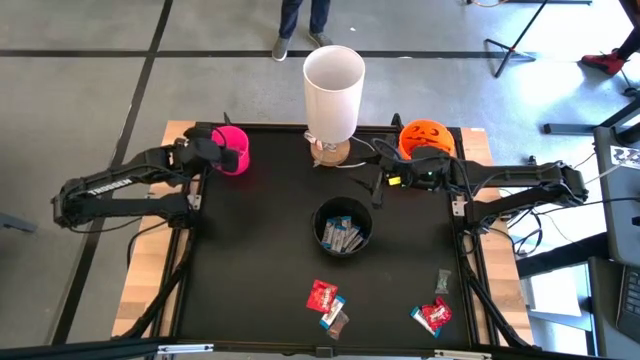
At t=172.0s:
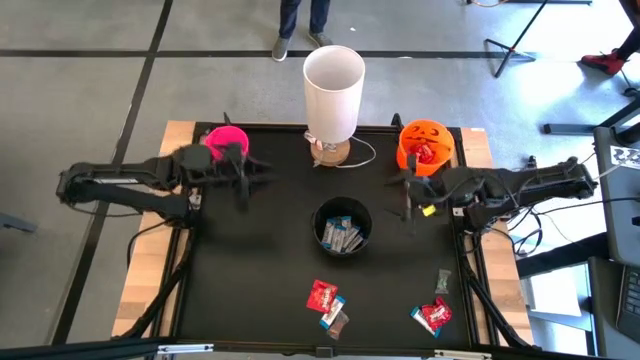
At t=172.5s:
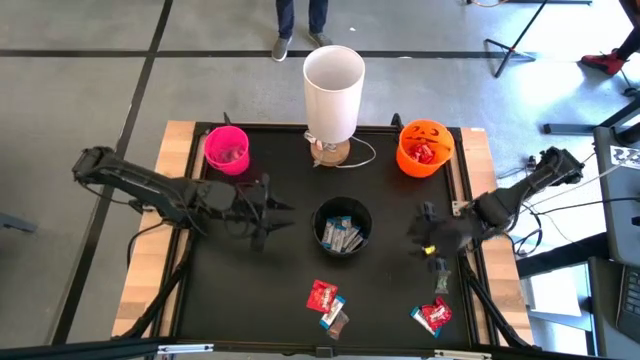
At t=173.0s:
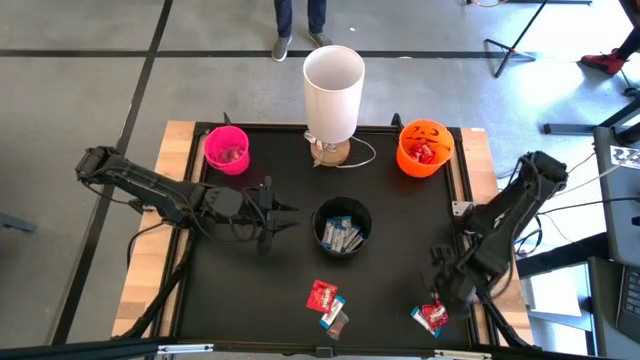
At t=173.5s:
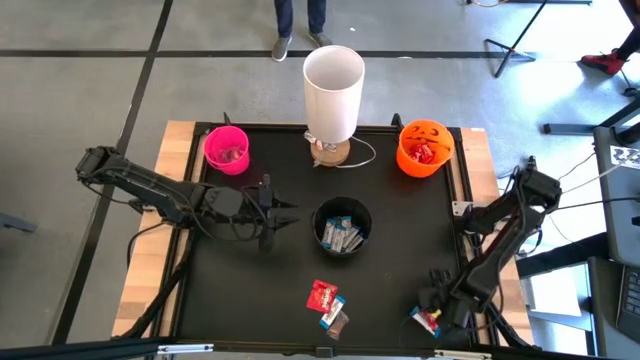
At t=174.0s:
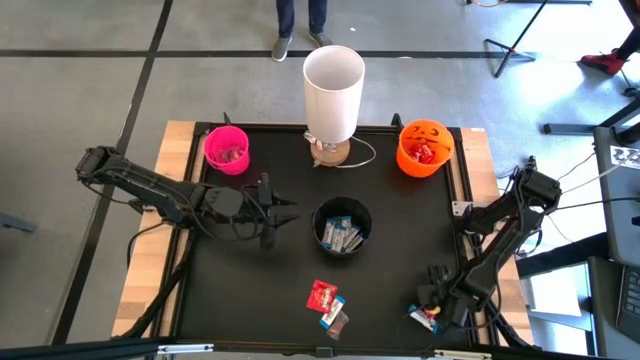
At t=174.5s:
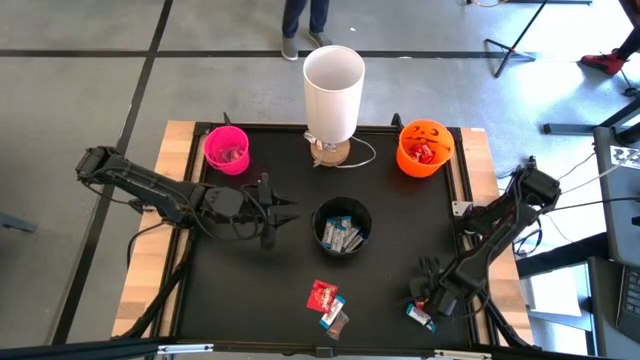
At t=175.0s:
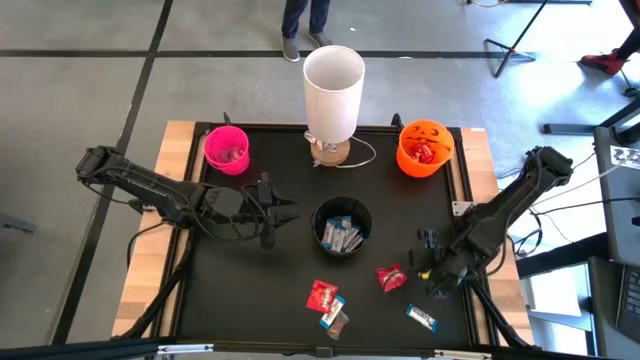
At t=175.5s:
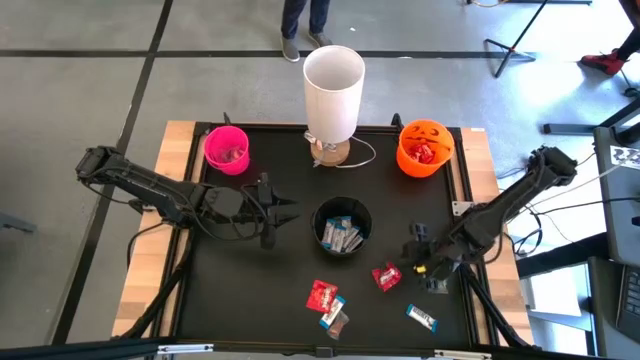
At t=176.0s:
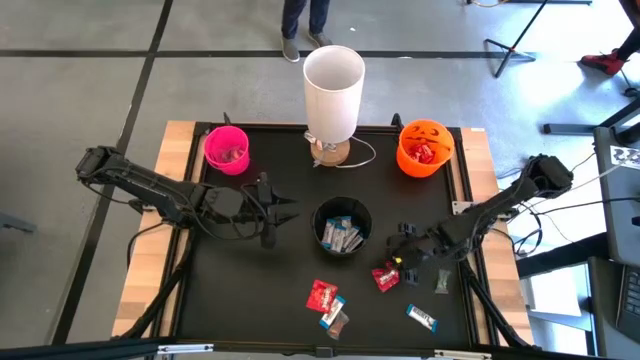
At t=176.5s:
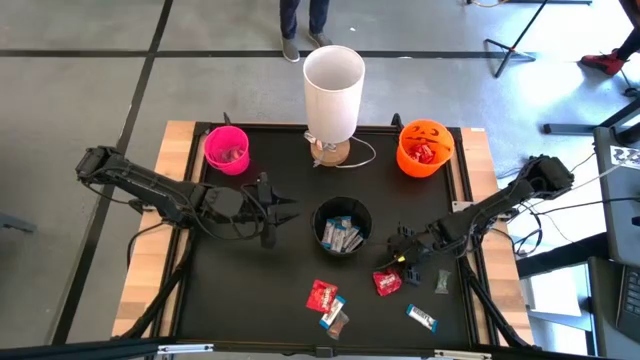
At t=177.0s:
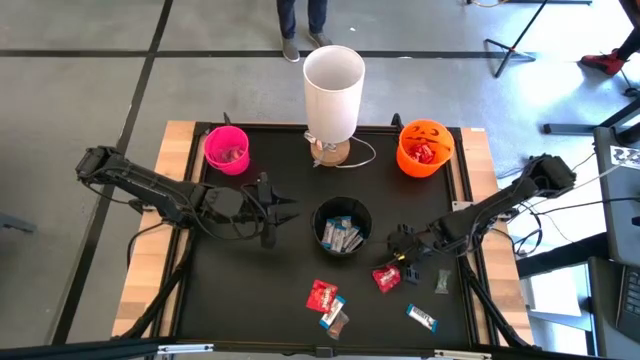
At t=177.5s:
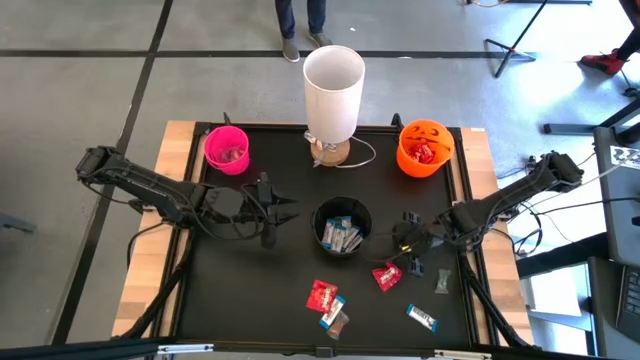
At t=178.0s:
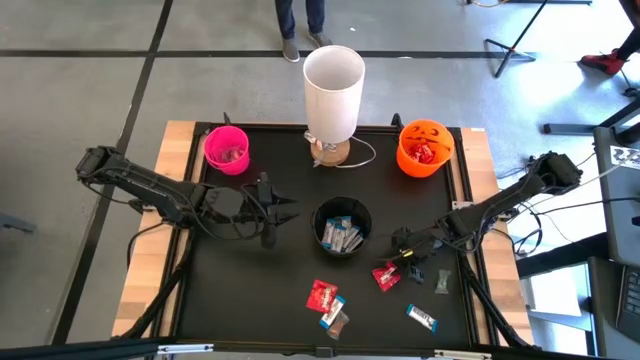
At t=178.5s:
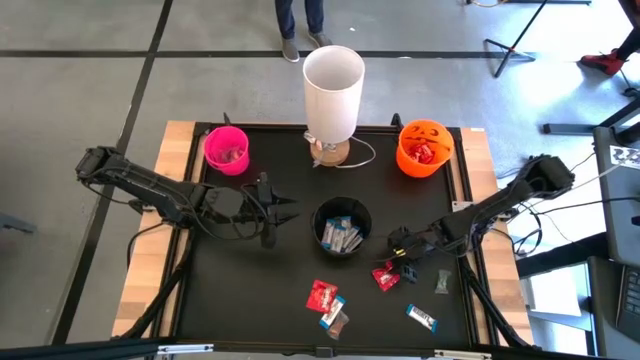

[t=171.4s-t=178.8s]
Task: Sort candy
Put the red candy pack into the orange bucket

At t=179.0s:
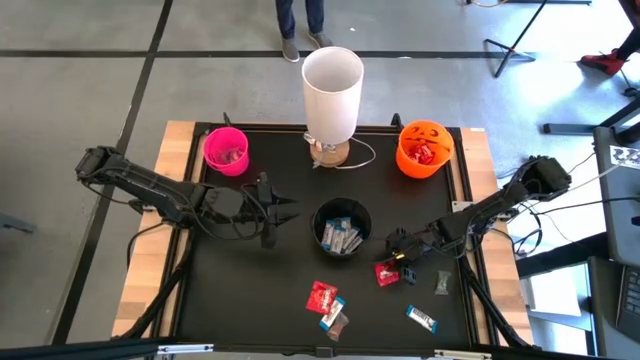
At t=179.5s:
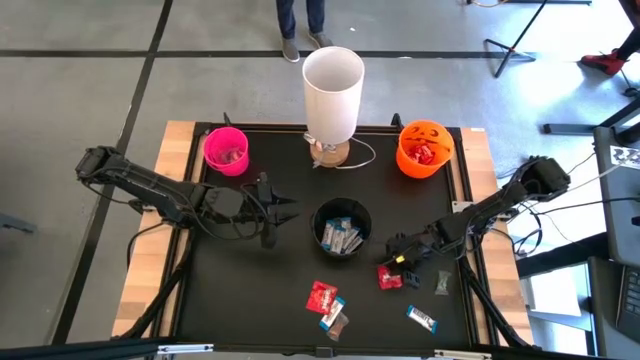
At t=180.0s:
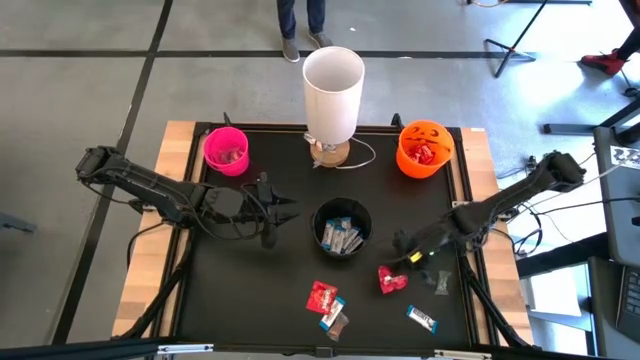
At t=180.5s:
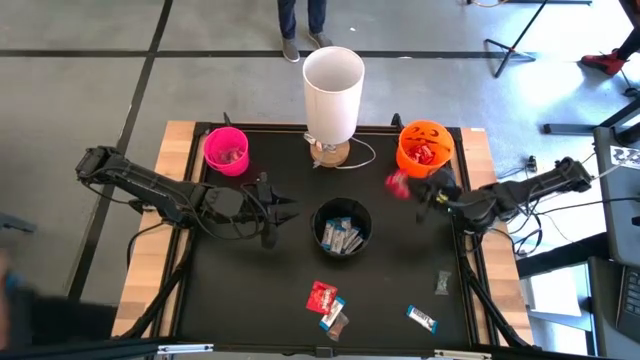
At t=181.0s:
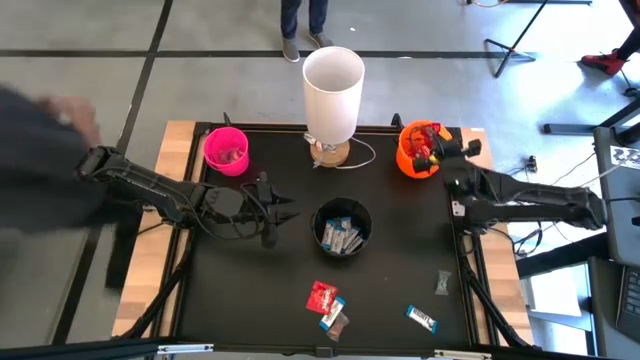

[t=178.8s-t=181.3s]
Put the red candy pack into the orange bucket

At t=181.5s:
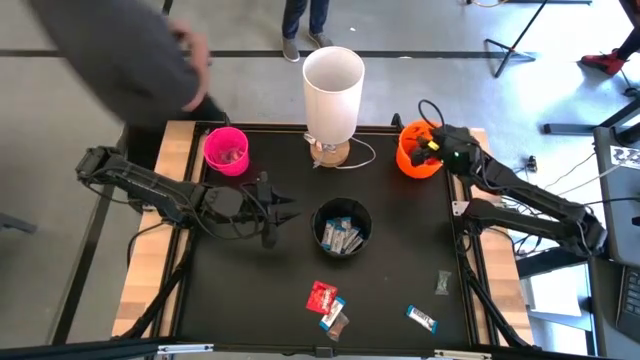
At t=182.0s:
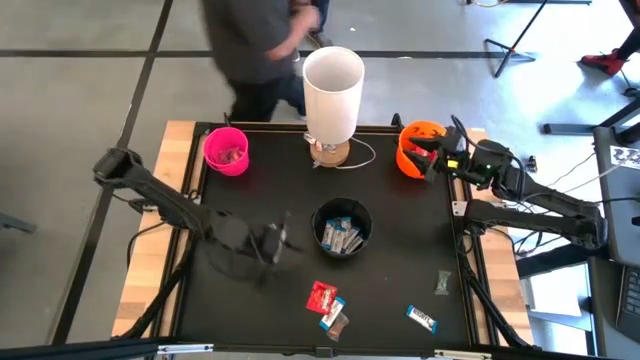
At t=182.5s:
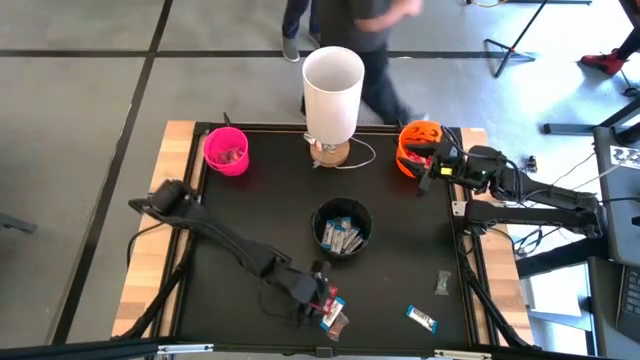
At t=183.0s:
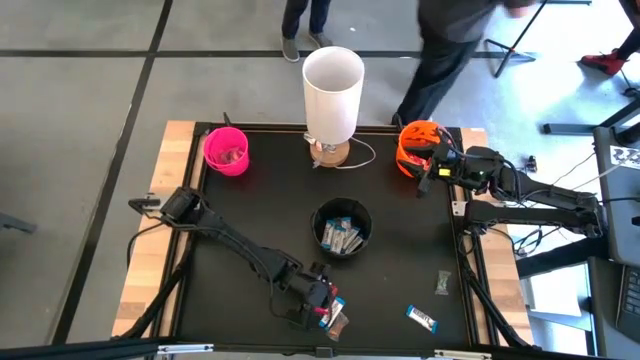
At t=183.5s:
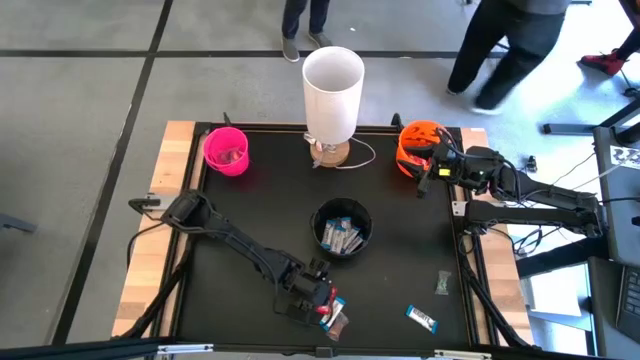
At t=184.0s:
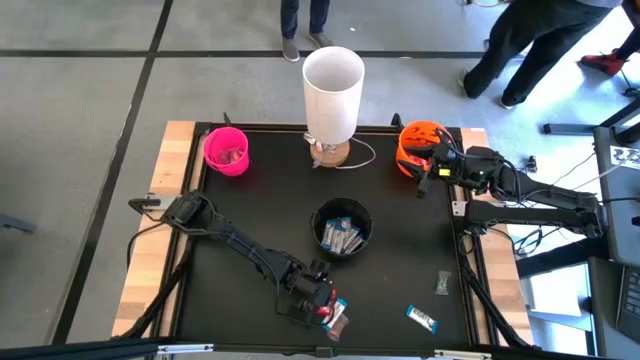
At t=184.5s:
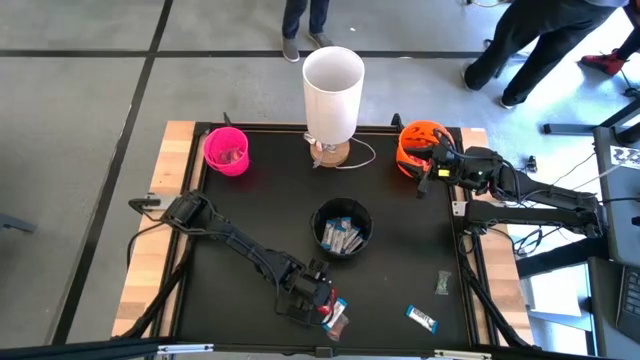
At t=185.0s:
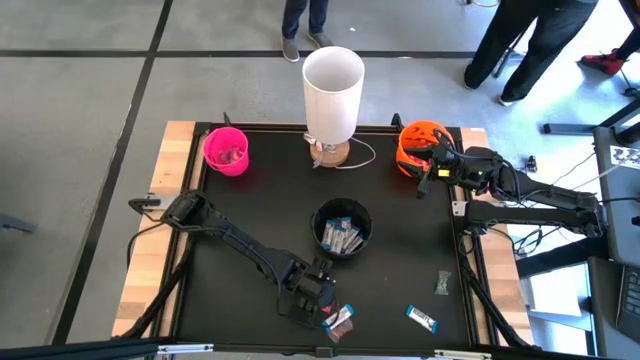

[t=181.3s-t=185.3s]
Put the red candy pack into the orange bucket

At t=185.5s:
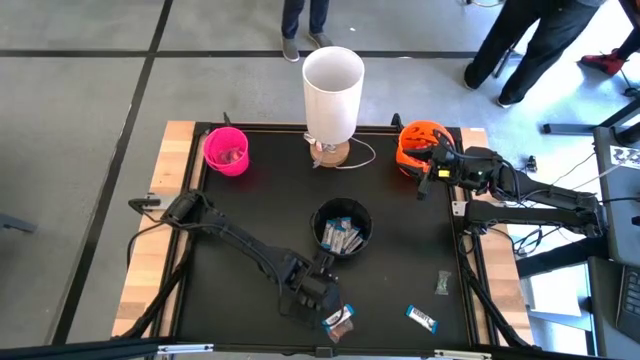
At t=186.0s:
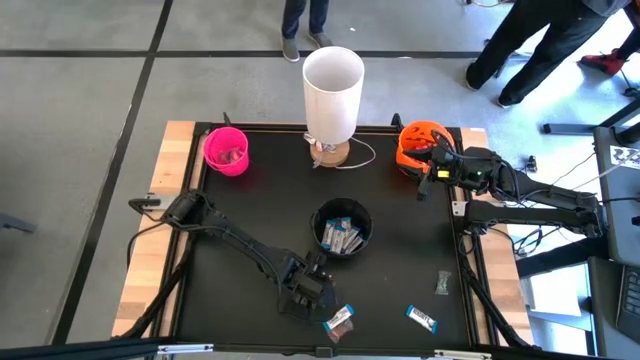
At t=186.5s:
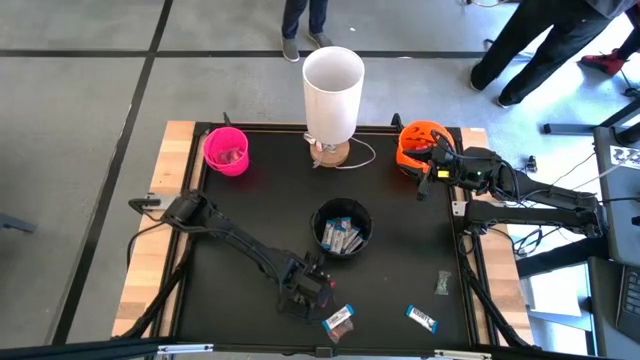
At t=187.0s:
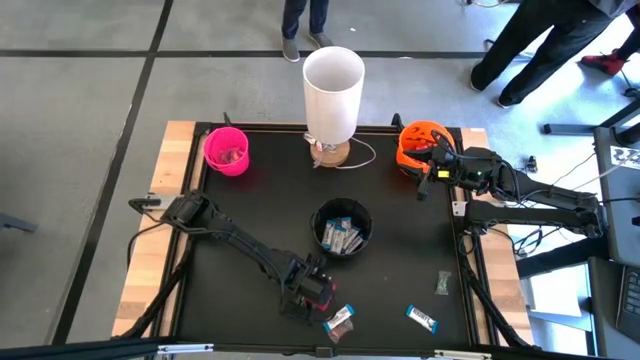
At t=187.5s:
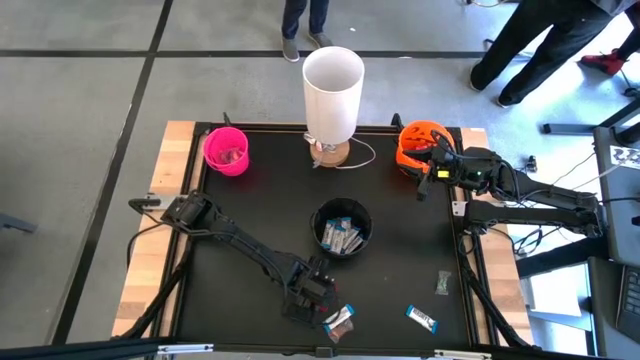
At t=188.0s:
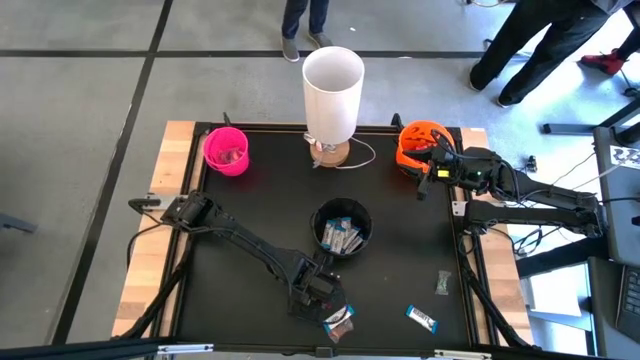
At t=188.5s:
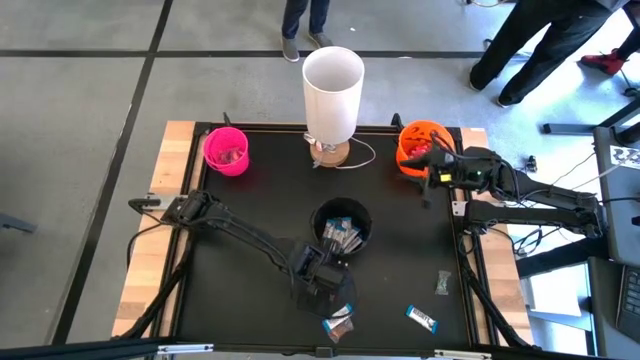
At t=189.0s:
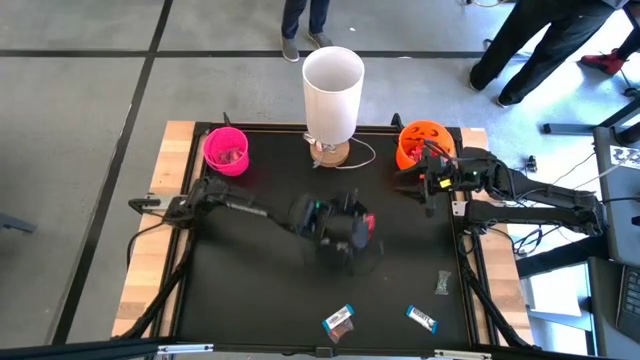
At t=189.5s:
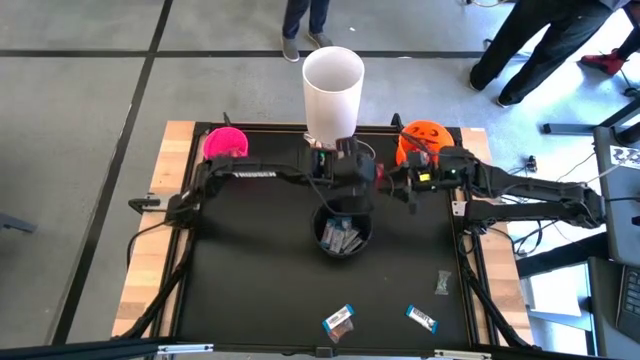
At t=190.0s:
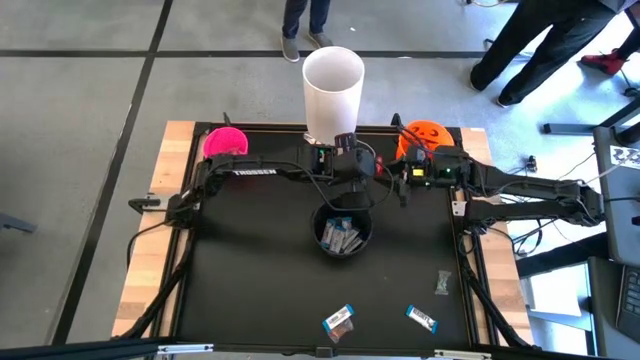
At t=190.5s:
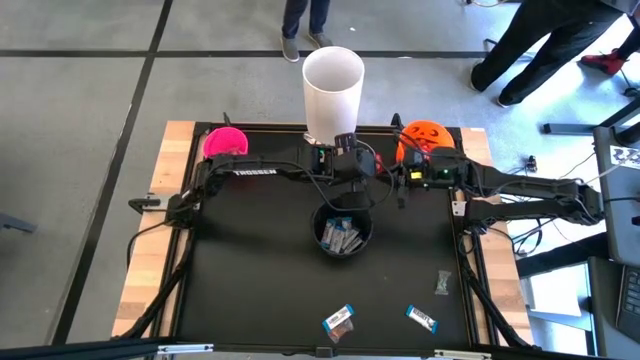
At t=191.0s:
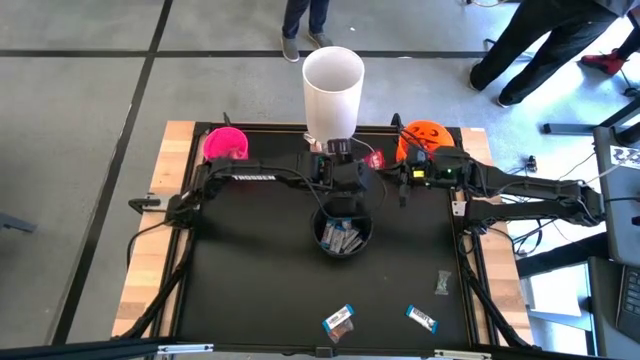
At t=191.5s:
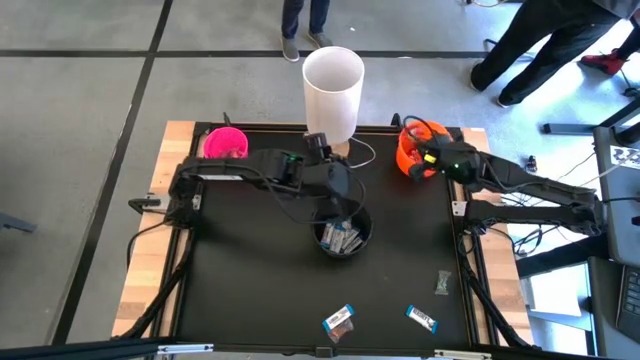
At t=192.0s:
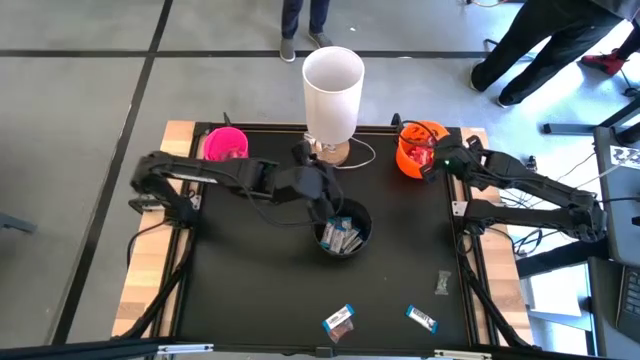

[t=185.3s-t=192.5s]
Put the red candy pack into the orange bucket
